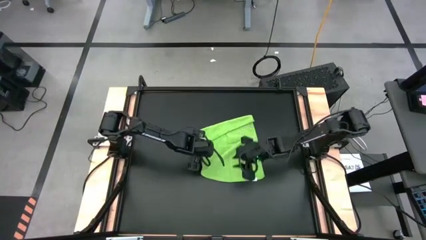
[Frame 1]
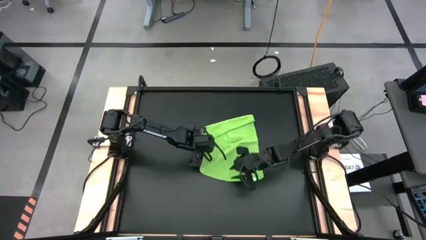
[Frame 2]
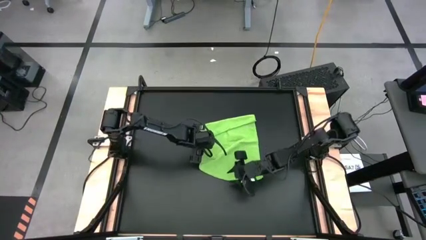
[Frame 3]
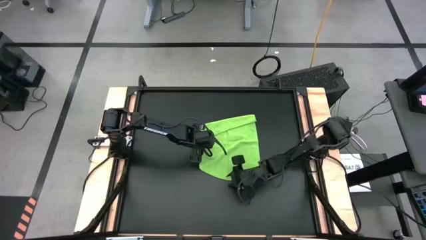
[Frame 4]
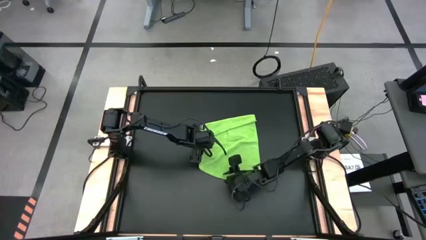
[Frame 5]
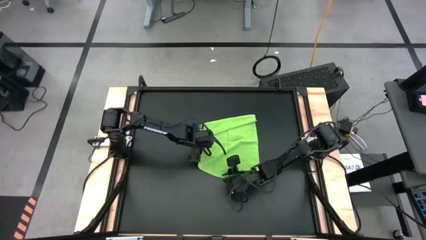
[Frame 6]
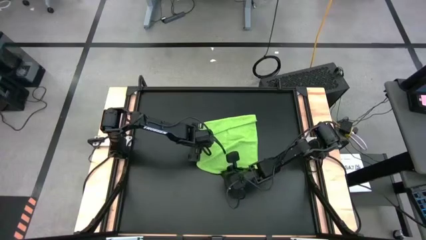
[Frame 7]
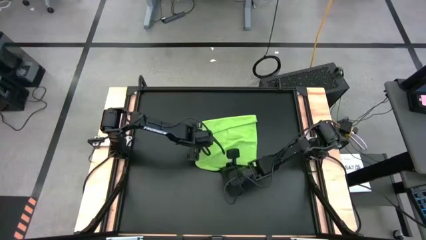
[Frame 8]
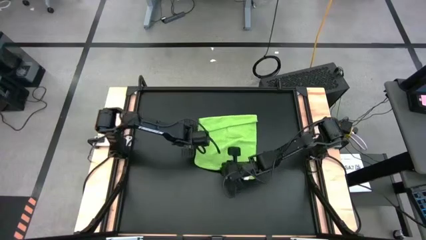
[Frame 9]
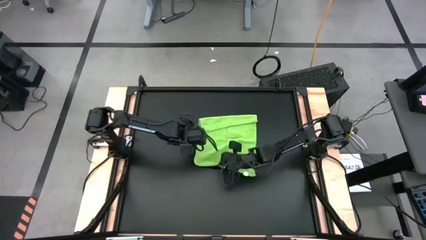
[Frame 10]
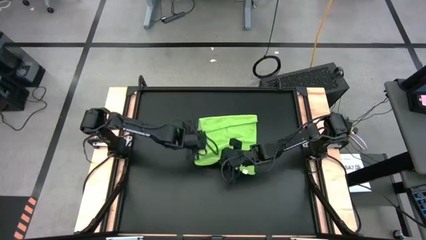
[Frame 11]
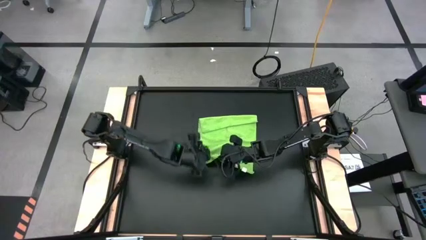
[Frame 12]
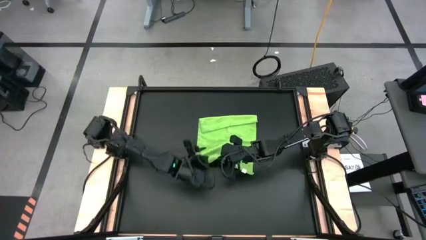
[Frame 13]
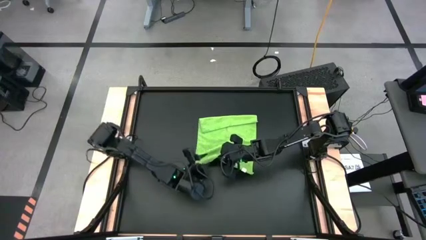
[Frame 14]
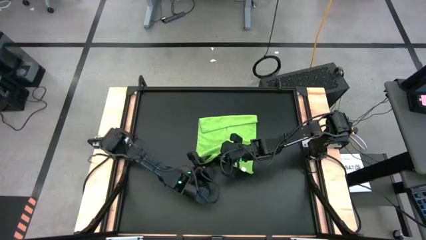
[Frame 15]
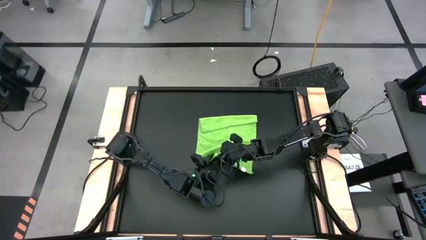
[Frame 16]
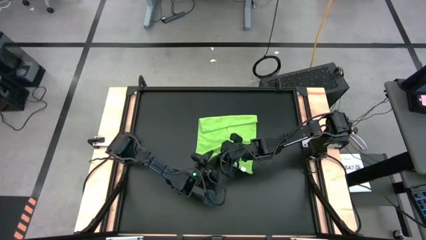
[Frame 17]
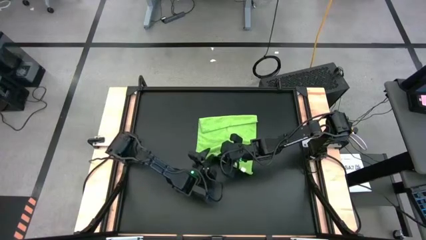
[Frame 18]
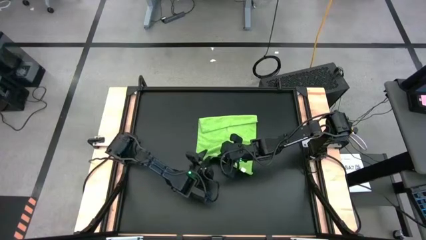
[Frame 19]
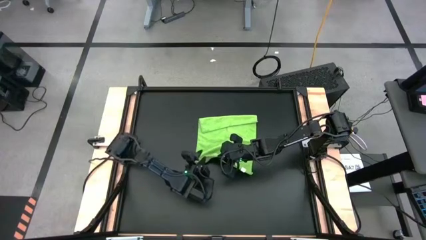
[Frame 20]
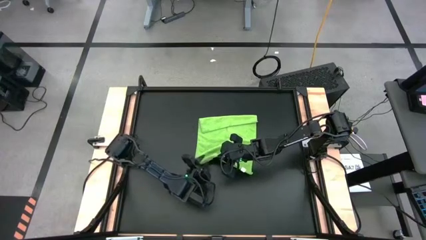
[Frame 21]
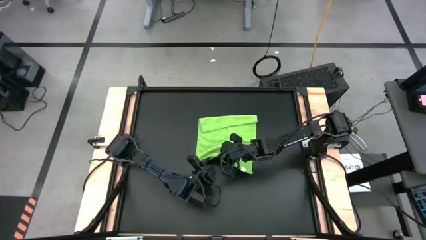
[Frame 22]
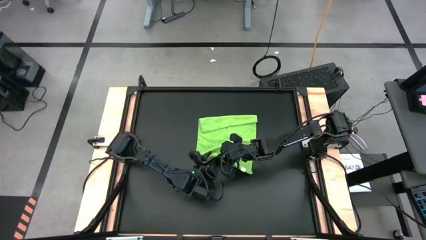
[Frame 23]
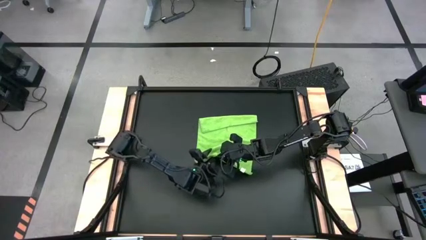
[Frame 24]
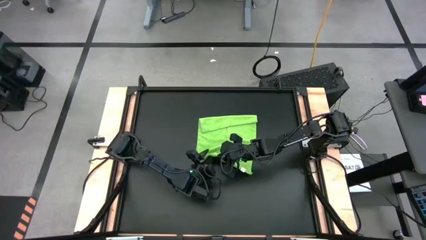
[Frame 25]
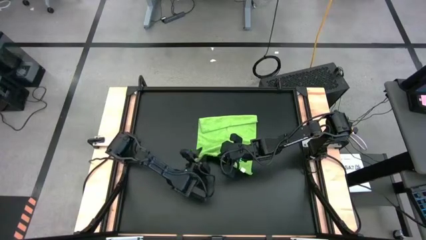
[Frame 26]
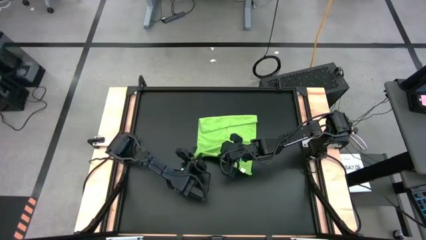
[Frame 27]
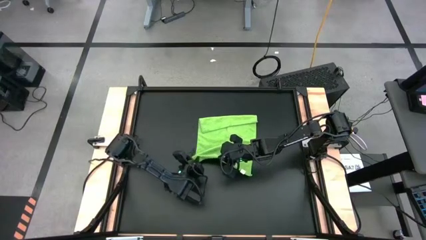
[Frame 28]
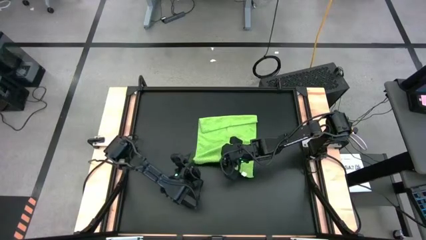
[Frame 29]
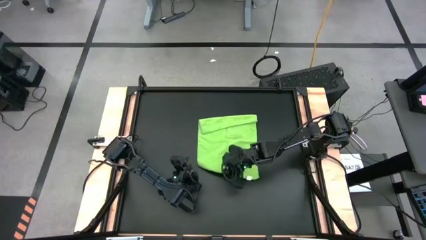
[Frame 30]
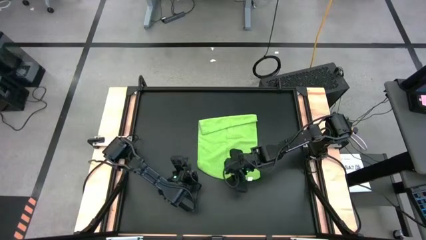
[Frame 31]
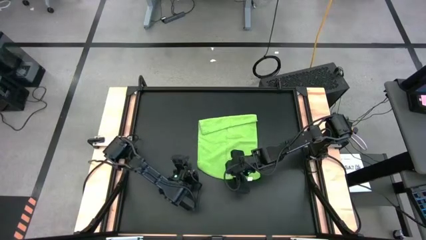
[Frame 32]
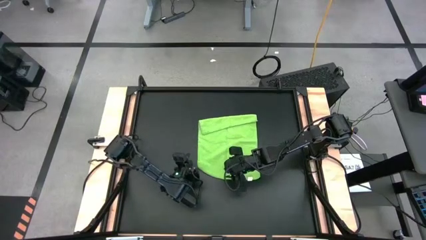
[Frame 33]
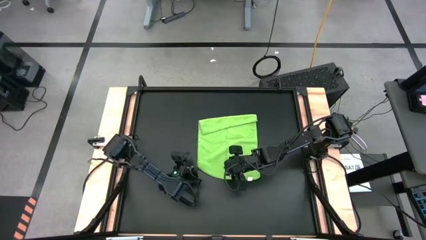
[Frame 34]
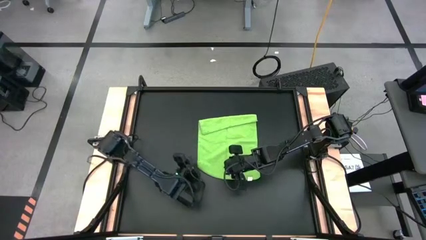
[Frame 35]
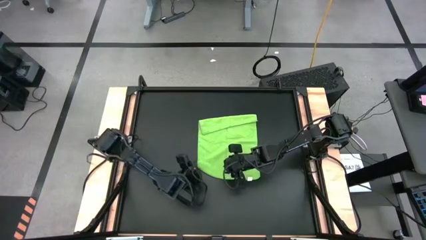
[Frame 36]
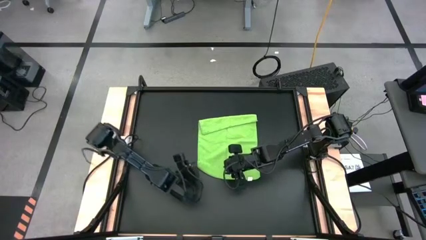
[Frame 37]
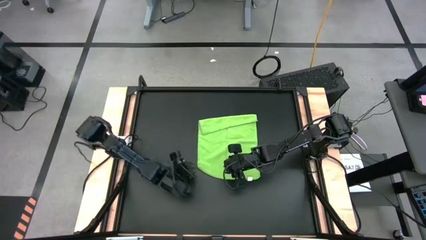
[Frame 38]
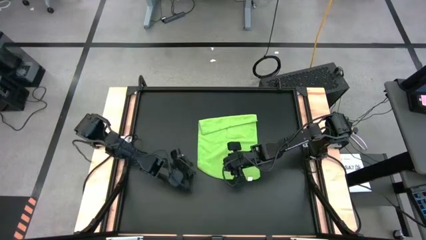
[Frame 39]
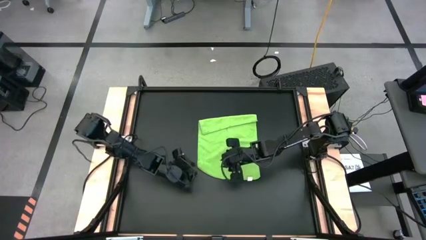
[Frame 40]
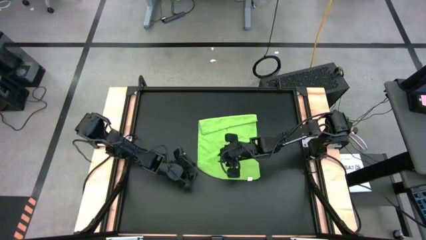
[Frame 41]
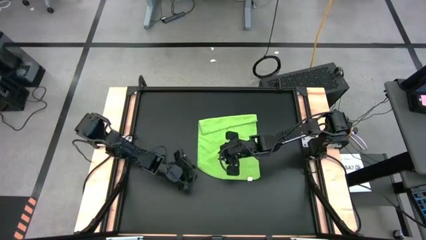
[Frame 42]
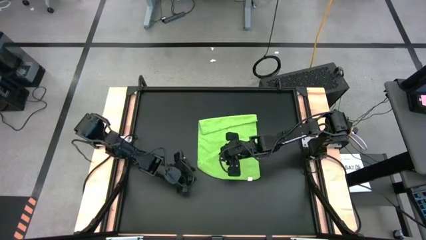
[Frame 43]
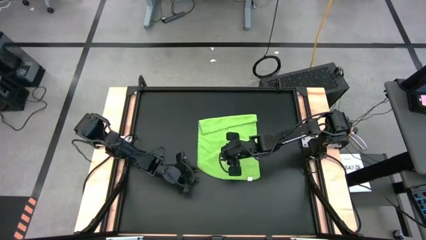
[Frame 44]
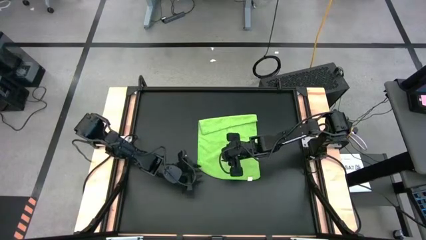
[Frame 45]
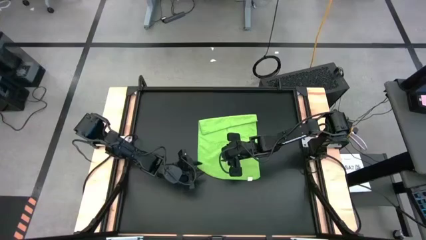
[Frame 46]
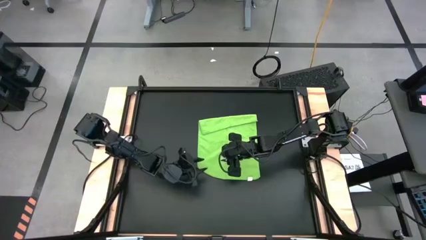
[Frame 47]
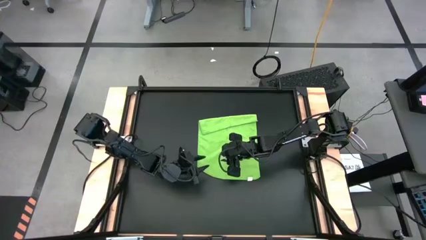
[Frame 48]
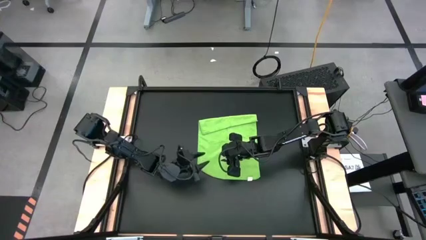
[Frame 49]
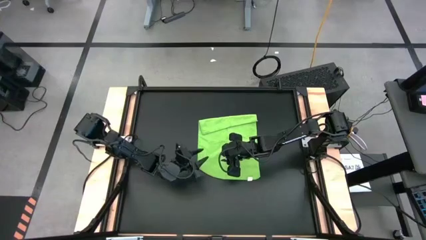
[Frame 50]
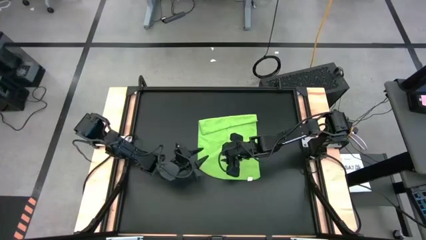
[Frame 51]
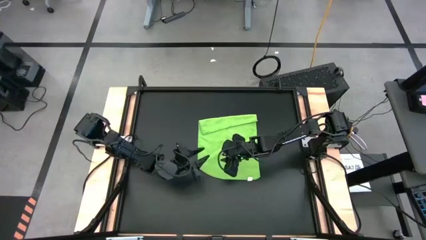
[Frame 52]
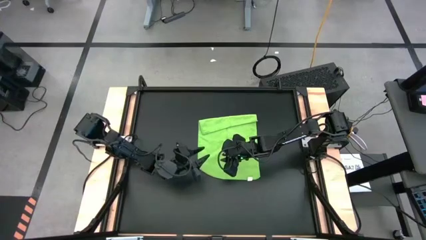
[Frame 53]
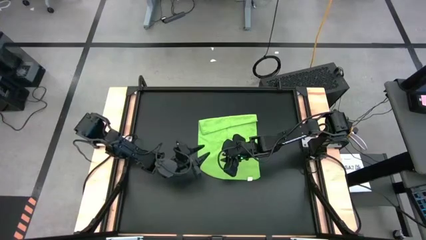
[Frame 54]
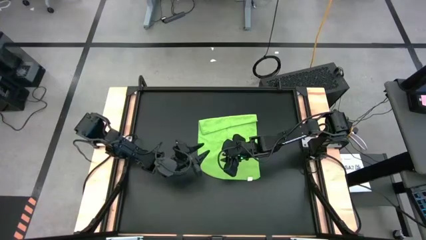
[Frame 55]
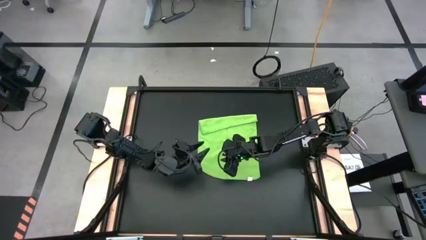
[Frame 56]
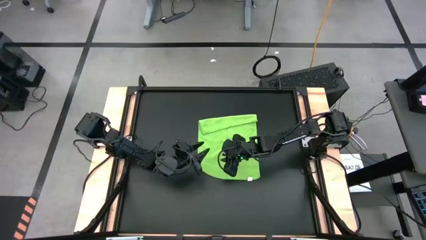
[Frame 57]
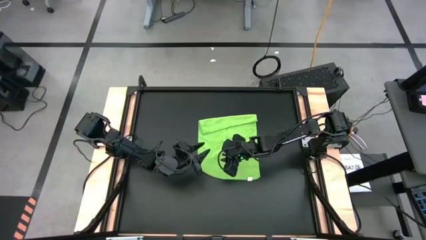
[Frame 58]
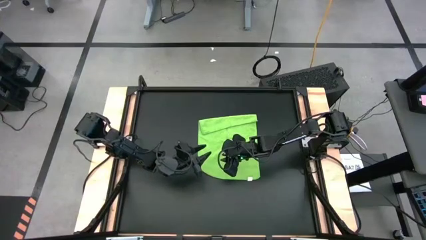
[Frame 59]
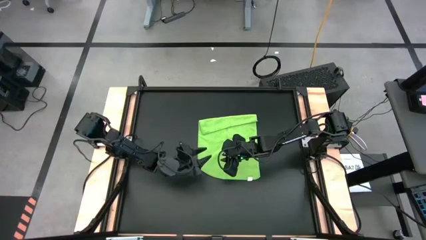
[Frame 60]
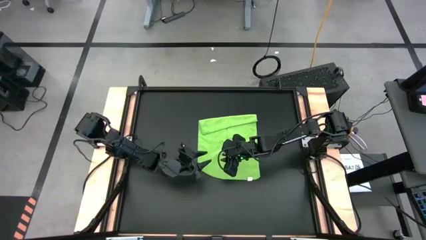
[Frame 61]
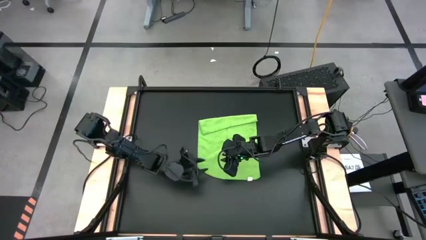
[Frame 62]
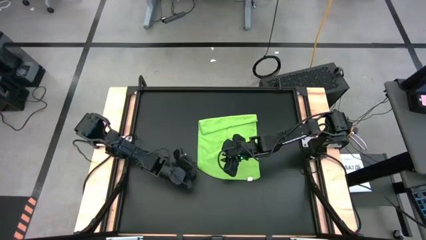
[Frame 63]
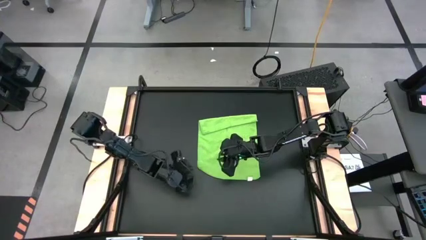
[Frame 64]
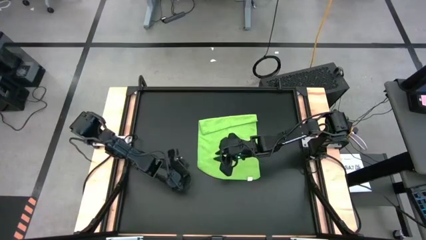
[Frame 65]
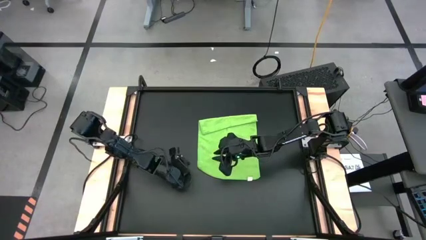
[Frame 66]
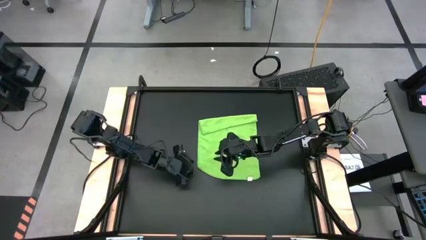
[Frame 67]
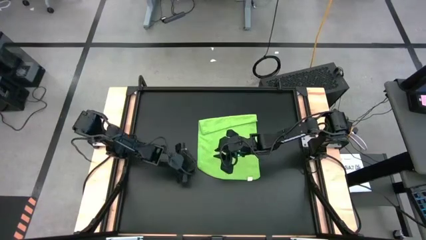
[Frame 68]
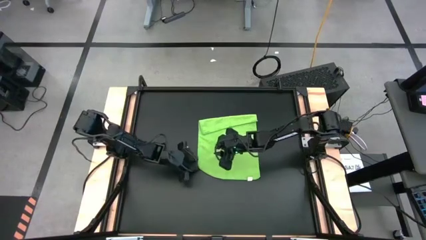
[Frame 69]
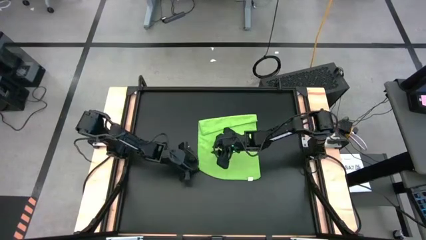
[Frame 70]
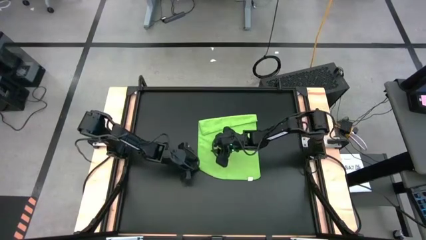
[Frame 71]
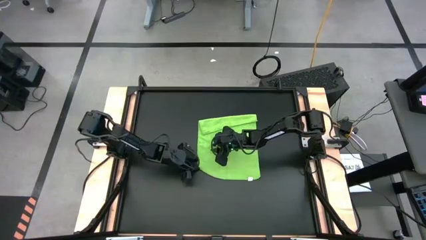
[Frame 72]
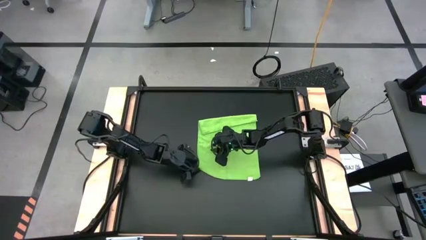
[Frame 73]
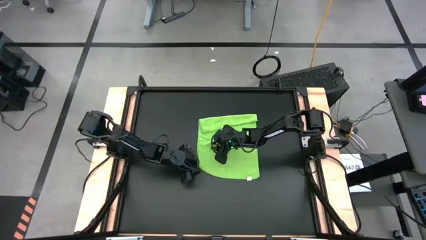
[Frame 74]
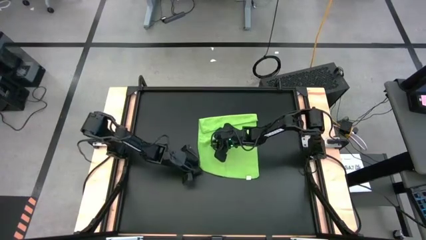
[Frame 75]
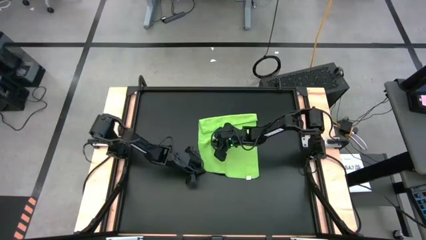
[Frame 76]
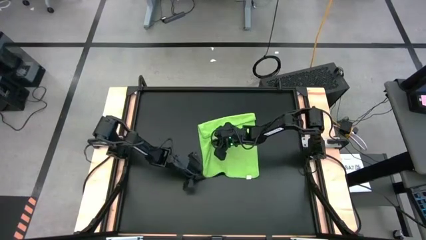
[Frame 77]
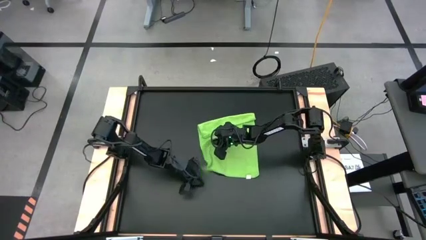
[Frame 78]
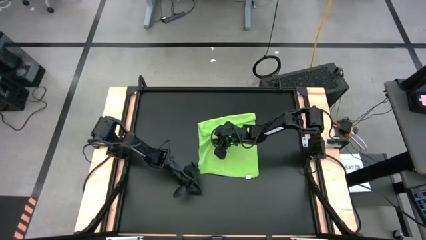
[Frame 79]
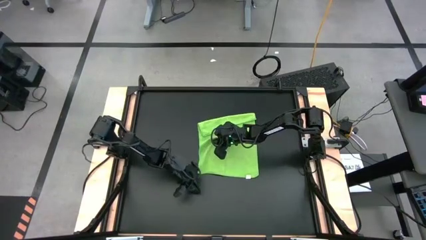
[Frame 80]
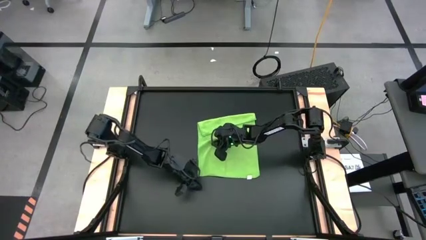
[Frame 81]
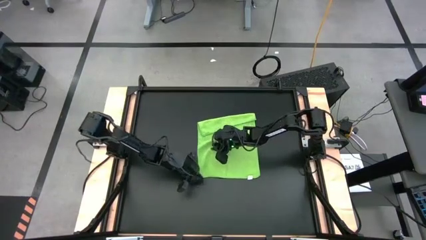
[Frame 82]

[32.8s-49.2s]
Task: Roll towel into tight, uniform cylinder
Fold the green towel
